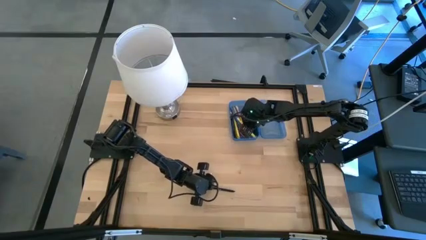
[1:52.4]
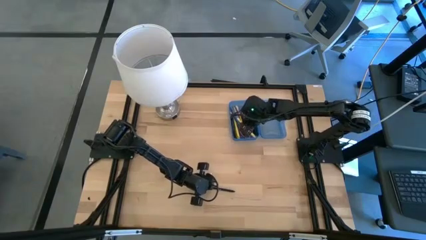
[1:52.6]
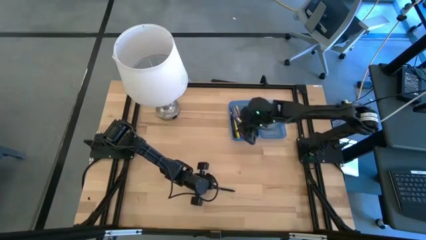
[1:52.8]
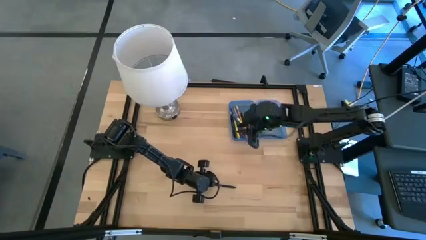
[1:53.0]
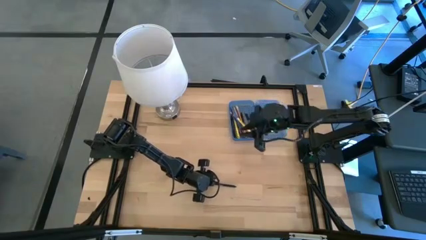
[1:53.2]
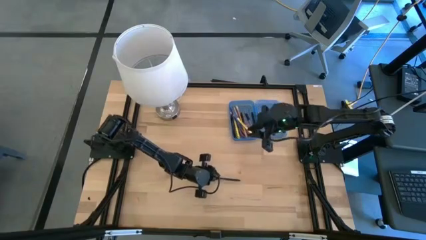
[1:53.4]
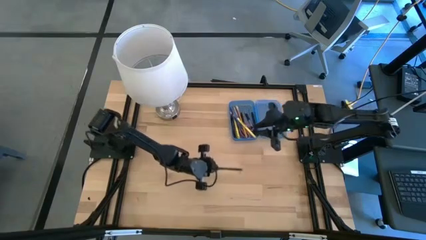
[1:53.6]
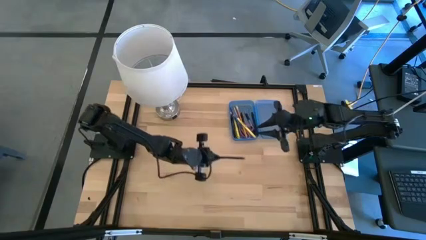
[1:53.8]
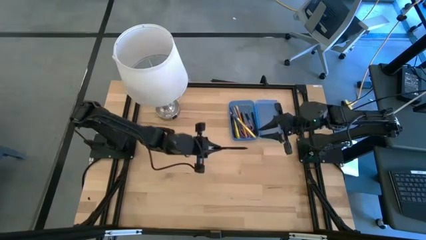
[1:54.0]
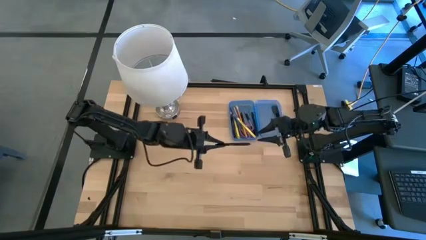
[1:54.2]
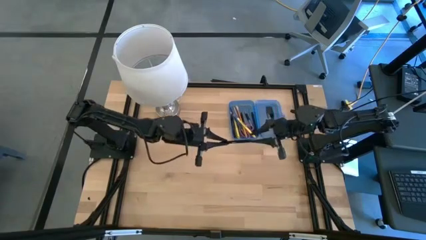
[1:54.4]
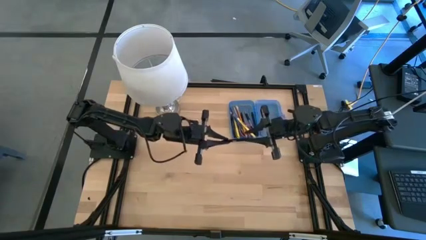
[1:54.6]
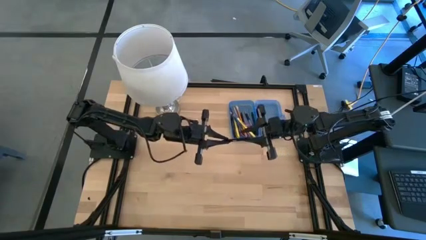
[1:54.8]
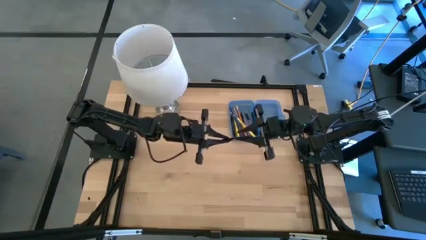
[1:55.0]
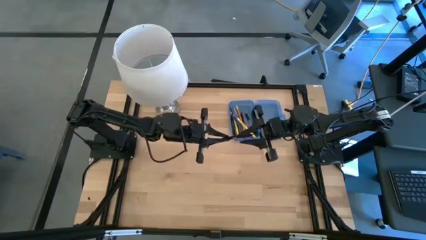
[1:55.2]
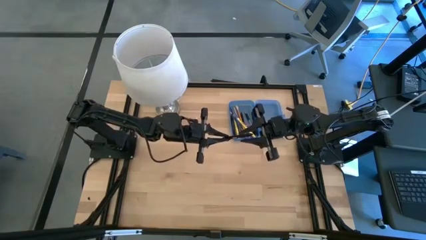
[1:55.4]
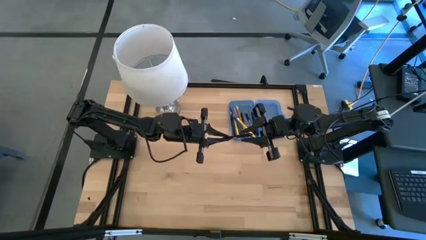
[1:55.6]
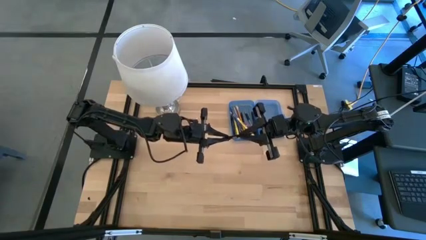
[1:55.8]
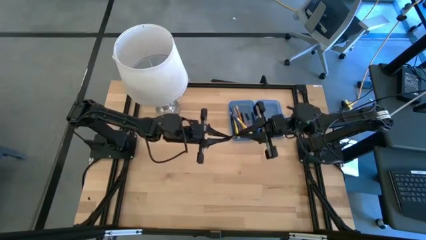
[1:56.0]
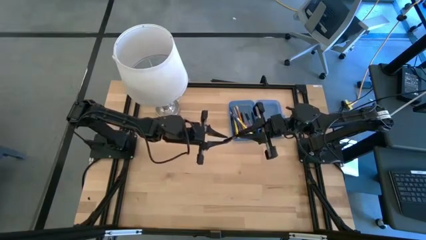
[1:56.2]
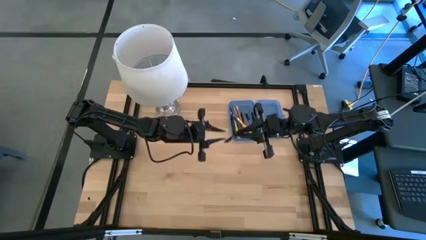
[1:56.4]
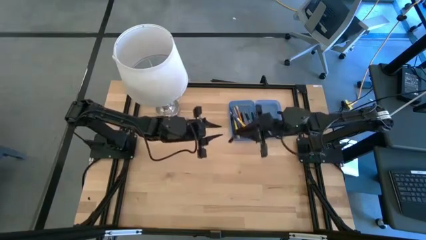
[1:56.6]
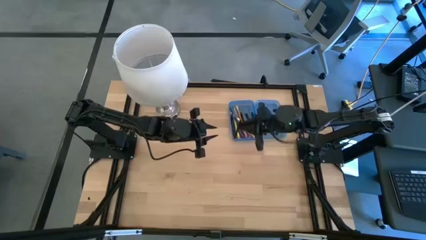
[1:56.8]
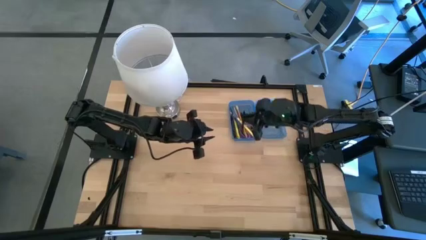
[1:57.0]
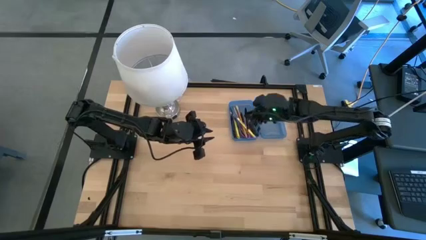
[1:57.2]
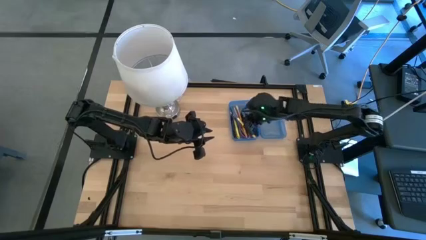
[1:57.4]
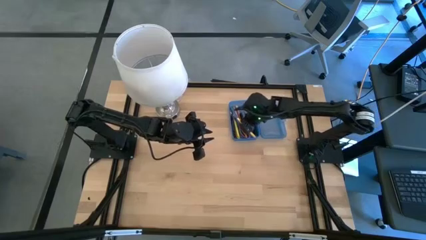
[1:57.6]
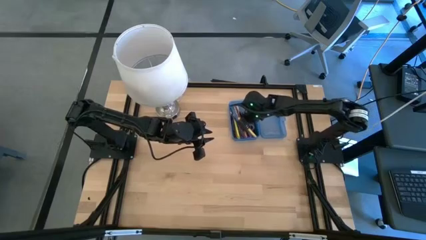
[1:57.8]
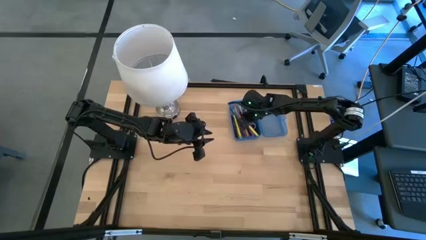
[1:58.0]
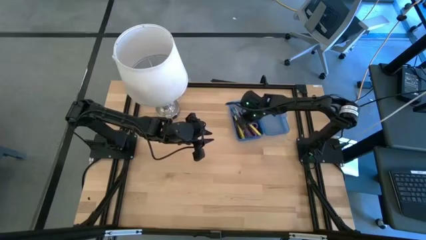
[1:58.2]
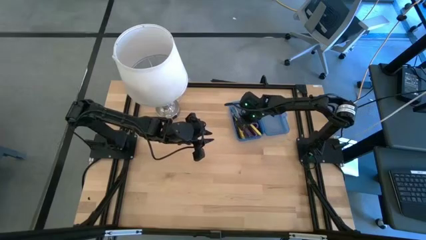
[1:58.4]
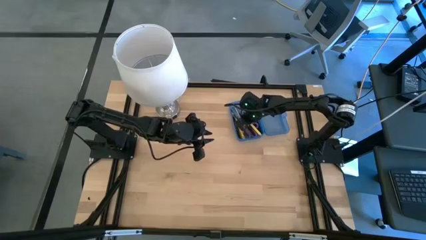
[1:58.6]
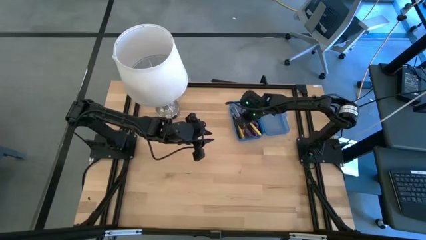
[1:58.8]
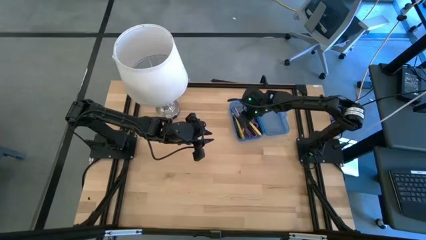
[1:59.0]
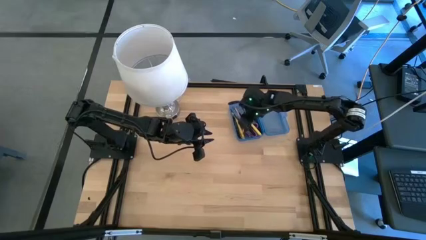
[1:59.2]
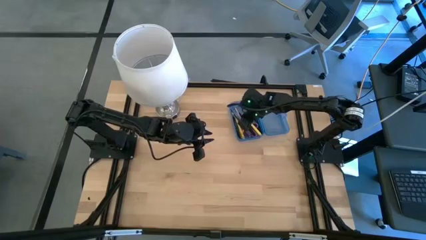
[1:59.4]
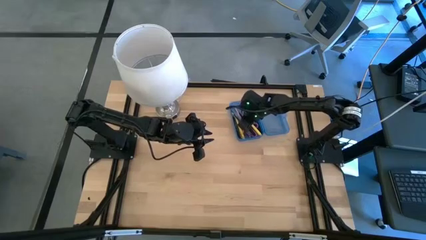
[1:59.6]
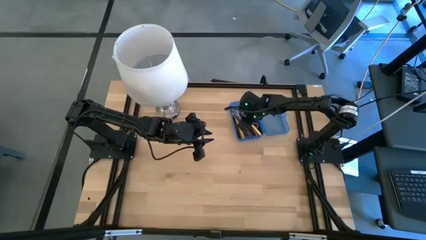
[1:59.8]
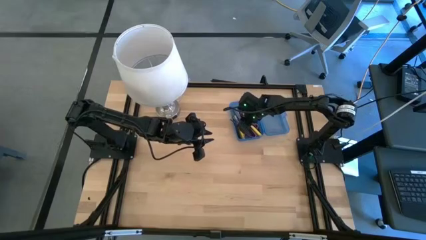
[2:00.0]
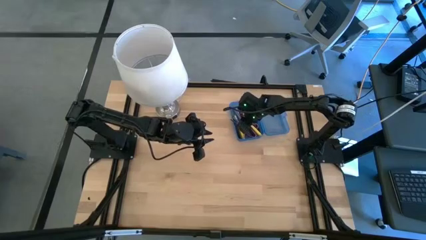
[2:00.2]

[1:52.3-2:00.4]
Task: Pick & place school supplies into a supply box
Put the black pen into the blue supply box
